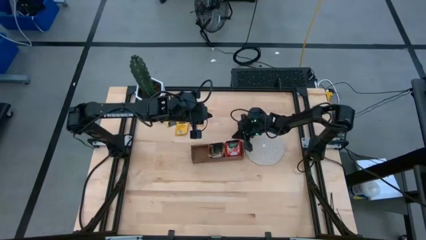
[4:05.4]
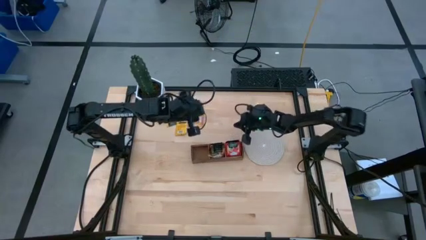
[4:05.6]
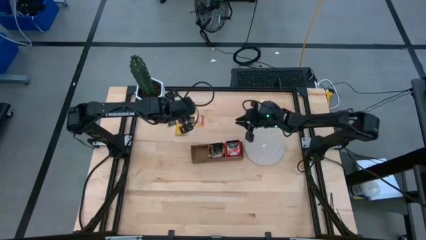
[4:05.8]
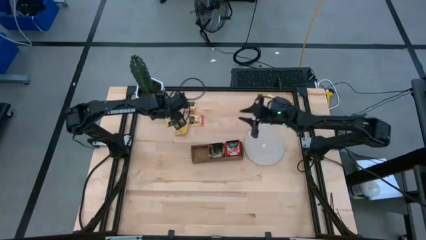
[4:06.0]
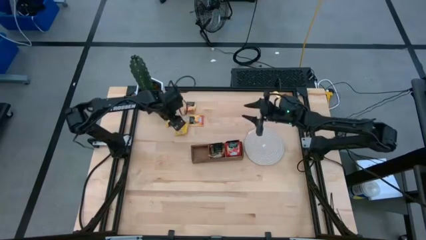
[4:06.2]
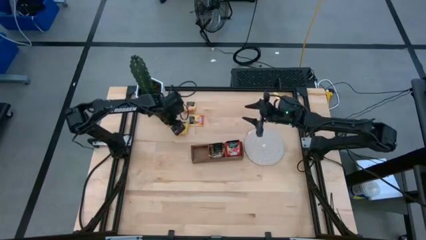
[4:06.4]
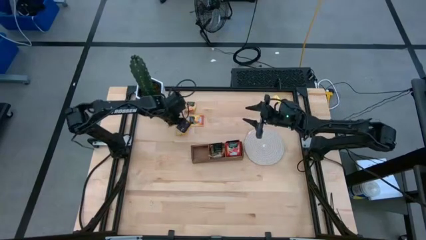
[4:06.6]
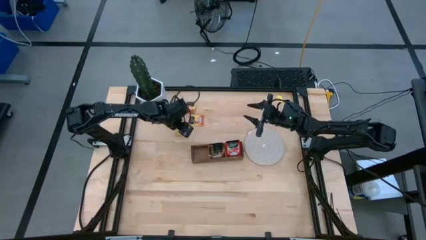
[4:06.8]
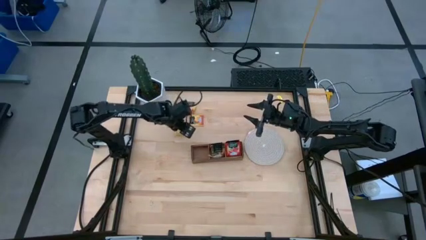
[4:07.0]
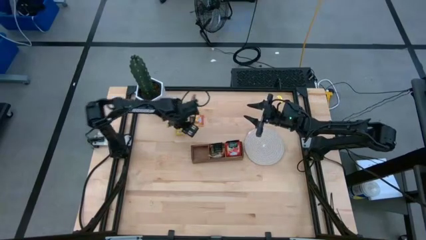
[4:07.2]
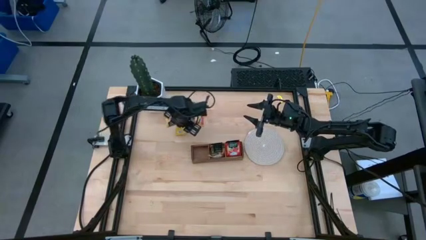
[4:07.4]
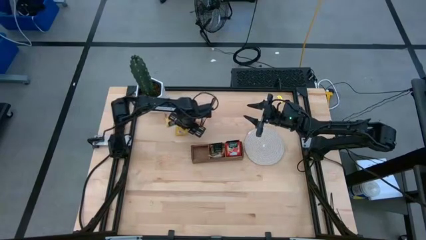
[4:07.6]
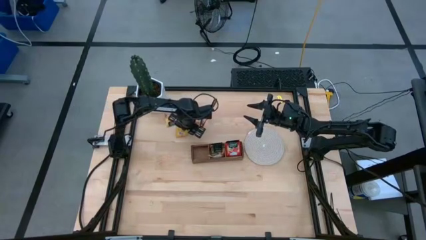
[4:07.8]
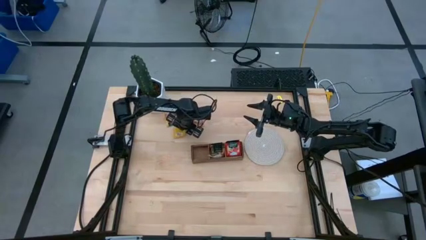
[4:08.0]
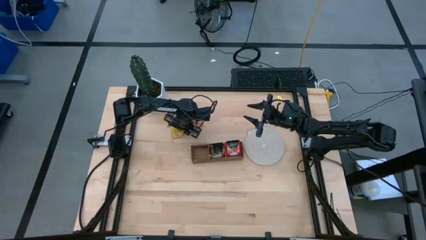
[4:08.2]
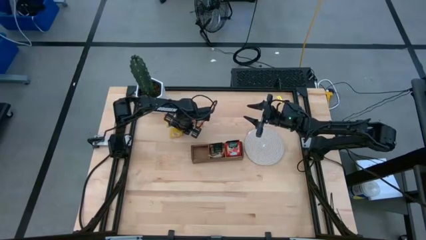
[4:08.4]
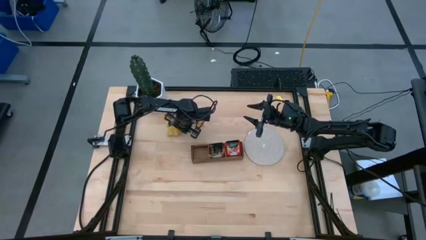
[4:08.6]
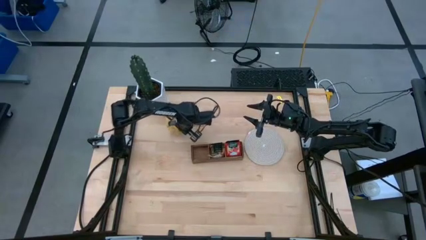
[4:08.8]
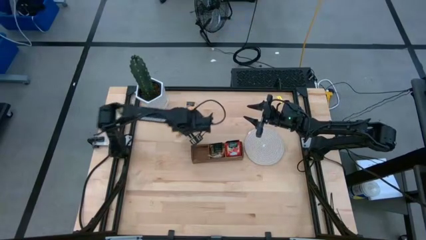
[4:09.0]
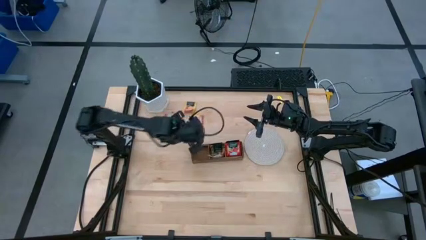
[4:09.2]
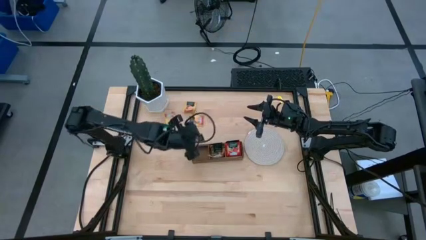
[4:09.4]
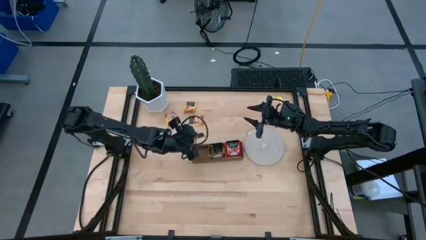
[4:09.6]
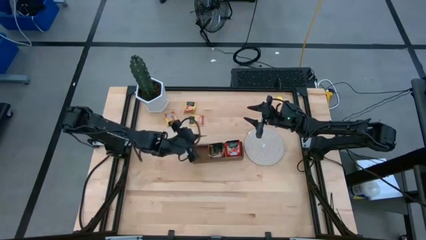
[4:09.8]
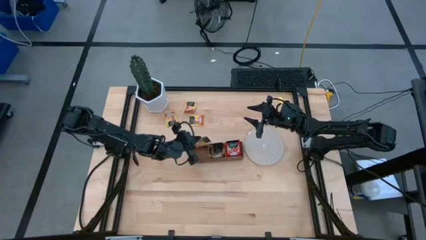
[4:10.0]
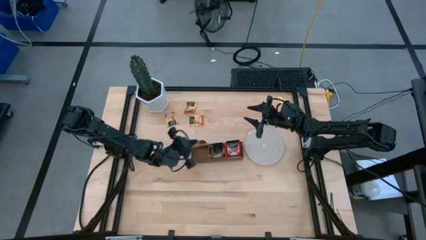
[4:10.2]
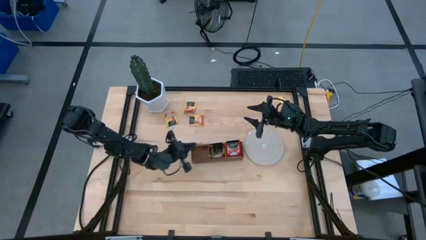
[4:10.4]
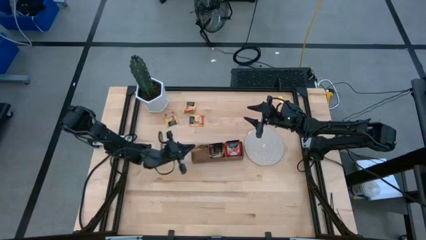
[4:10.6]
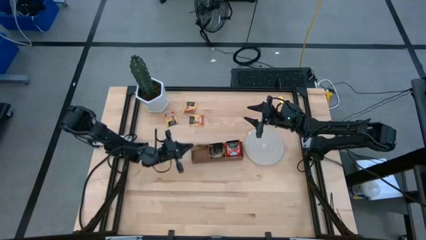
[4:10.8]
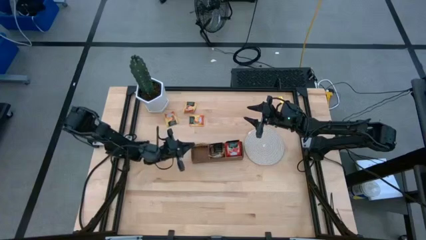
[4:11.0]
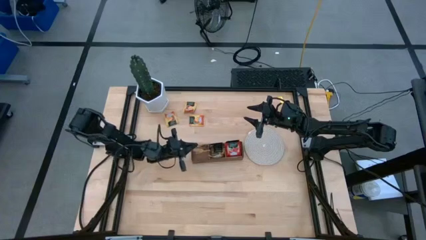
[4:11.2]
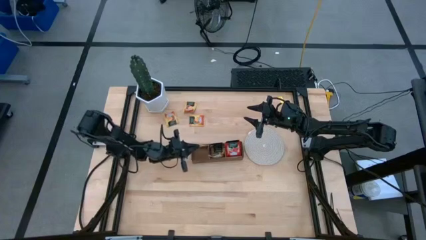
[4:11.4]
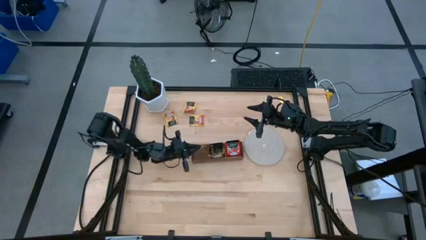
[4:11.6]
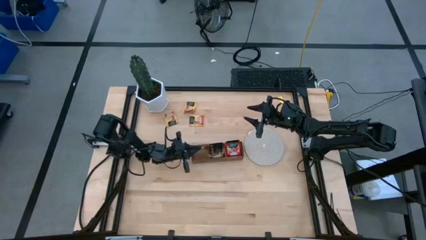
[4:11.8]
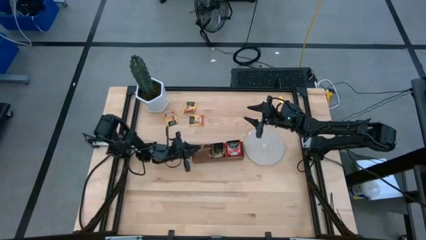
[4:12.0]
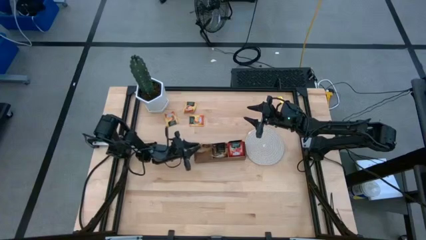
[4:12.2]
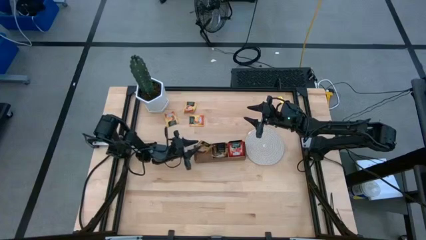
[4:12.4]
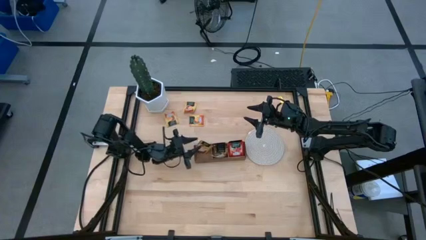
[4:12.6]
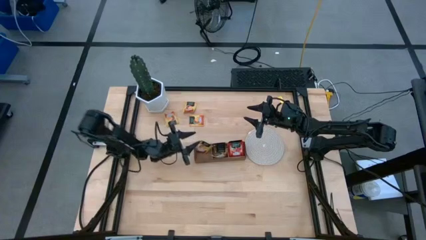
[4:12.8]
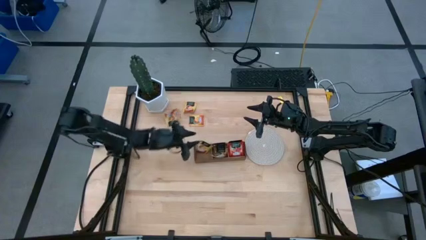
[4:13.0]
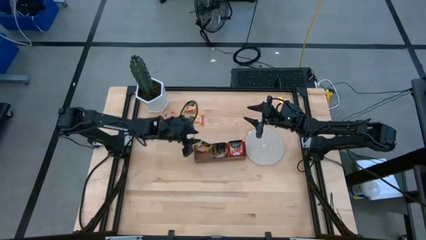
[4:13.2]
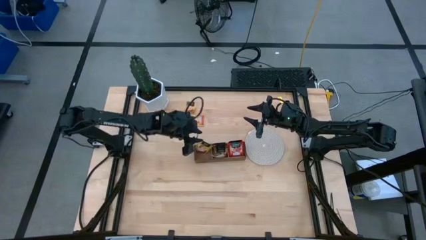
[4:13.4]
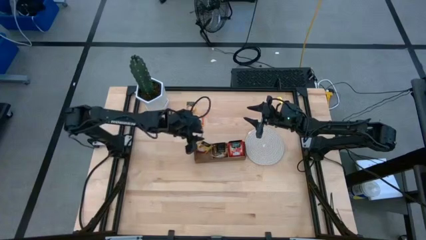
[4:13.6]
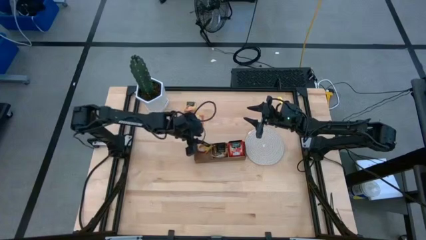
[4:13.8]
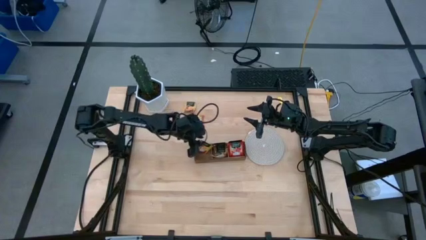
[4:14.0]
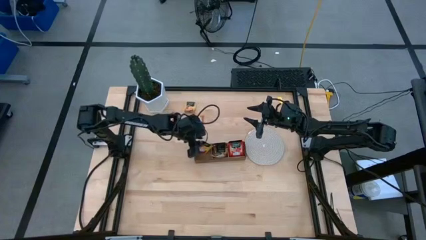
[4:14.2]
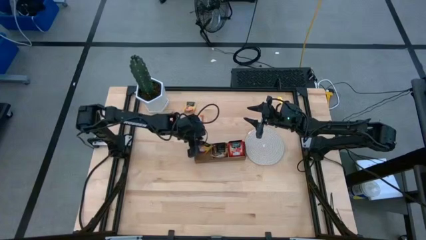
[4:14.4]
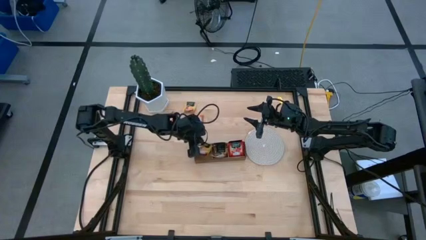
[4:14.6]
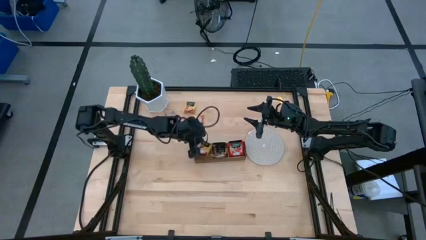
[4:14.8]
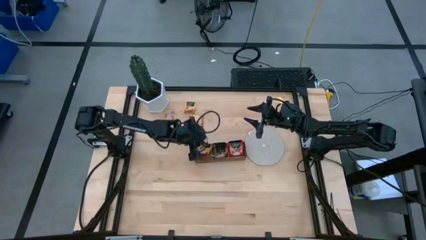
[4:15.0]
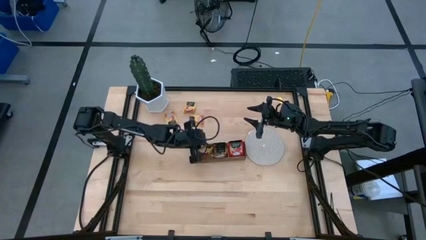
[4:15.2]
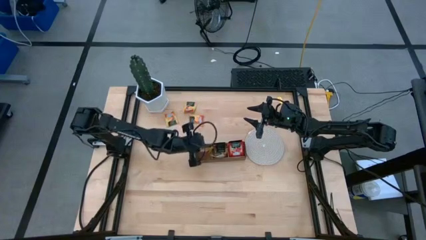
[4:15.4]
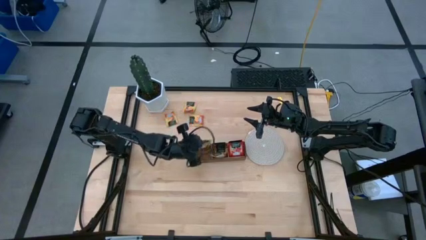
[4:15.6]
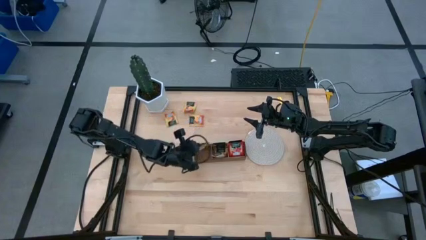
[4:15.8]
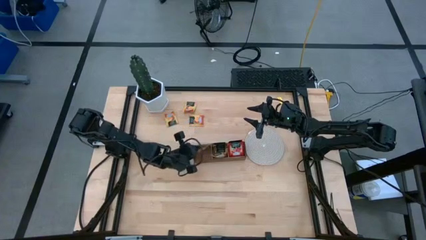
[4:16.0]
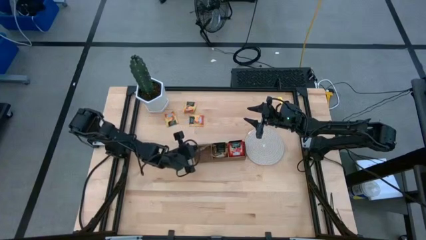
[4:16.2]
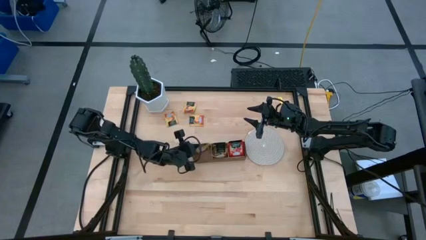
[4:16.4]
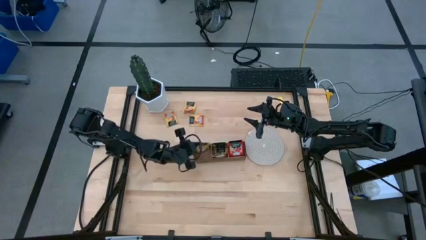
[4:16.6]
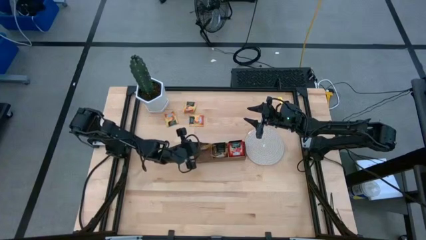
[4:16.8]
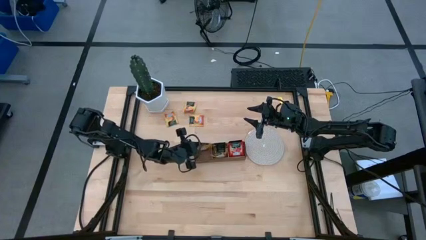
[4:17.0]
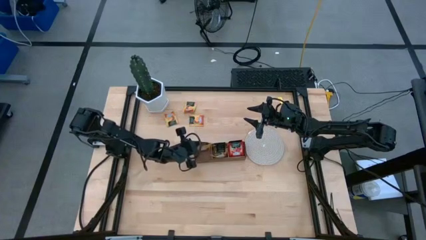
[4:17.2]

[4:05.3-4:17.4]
Task: Pick & Place Tea
Put the yellow tea bag into the left section of the wooden organizer

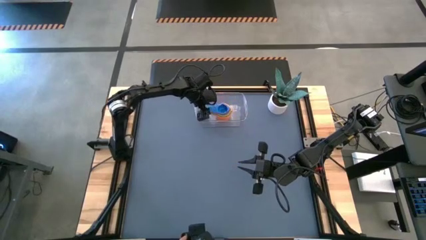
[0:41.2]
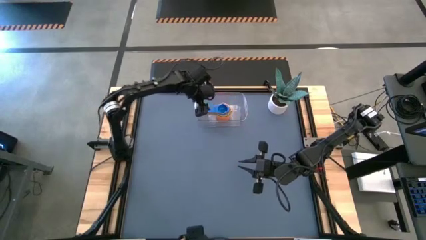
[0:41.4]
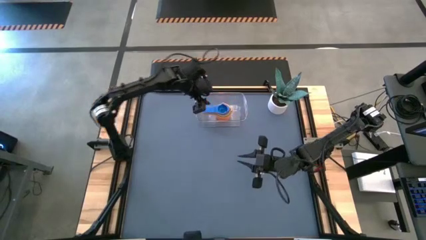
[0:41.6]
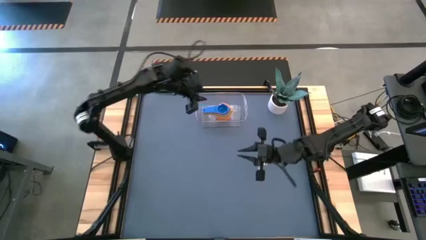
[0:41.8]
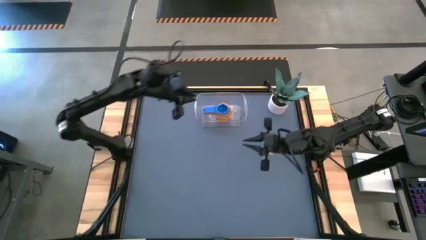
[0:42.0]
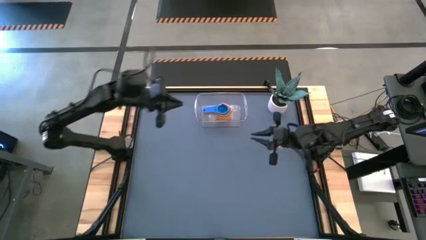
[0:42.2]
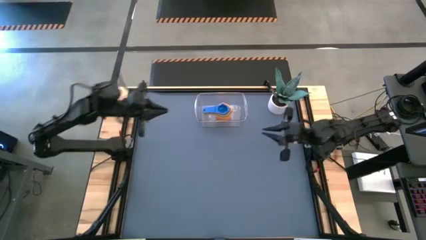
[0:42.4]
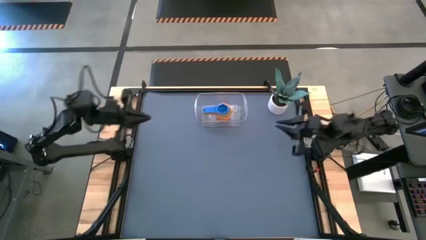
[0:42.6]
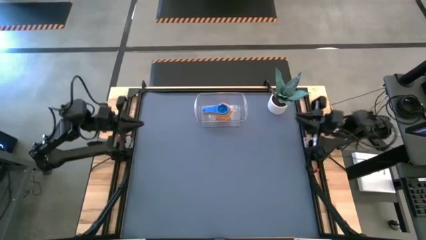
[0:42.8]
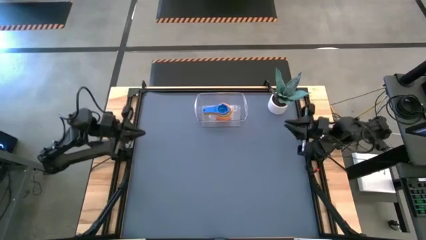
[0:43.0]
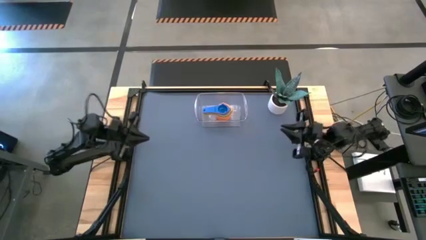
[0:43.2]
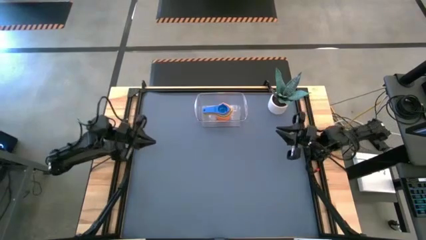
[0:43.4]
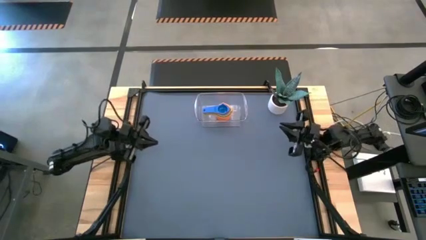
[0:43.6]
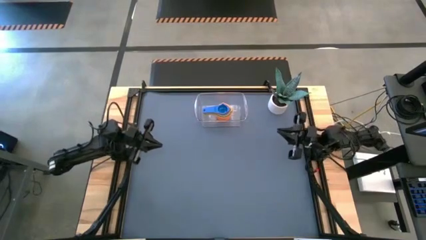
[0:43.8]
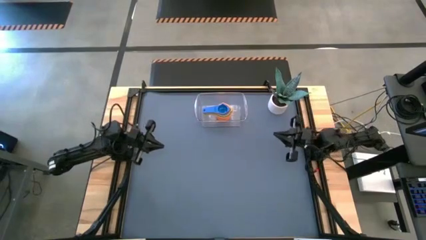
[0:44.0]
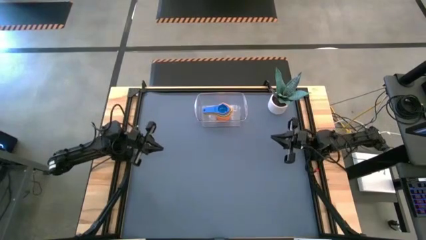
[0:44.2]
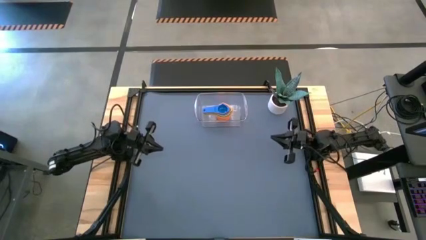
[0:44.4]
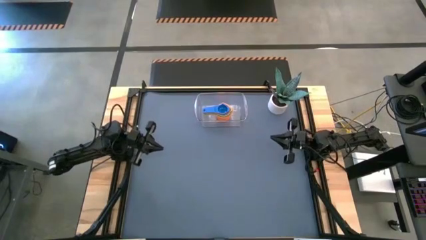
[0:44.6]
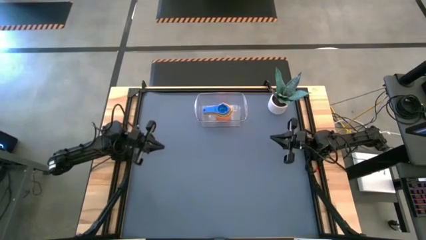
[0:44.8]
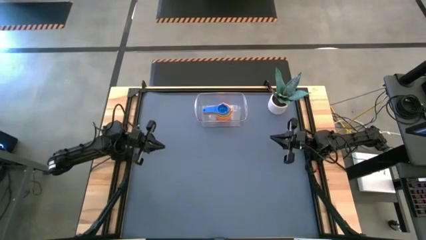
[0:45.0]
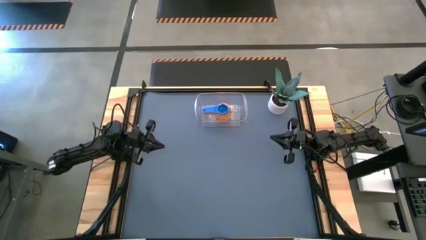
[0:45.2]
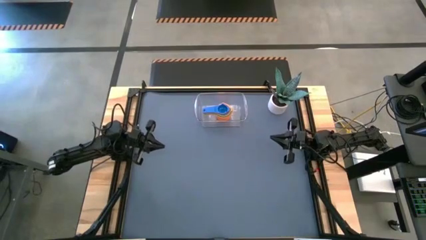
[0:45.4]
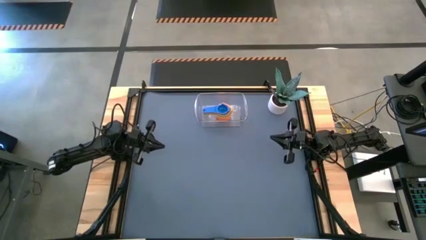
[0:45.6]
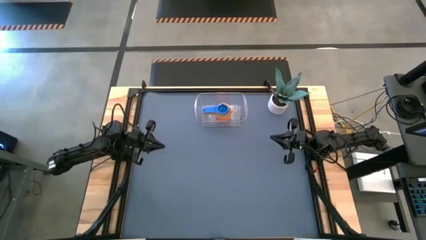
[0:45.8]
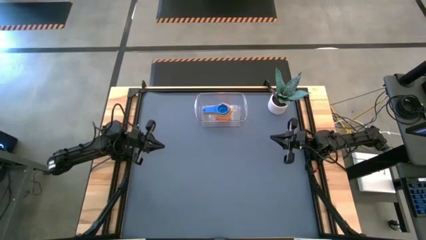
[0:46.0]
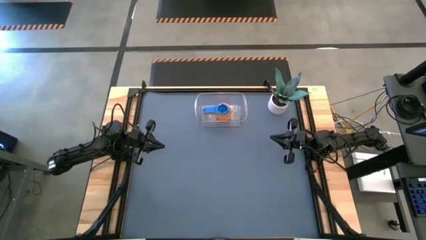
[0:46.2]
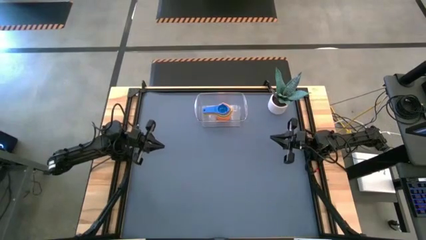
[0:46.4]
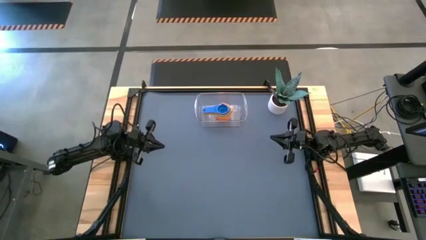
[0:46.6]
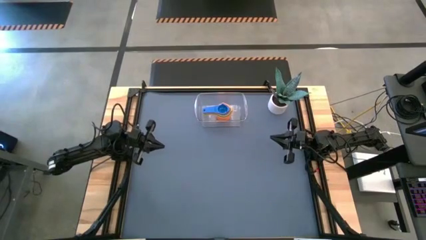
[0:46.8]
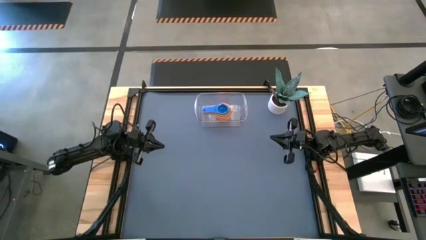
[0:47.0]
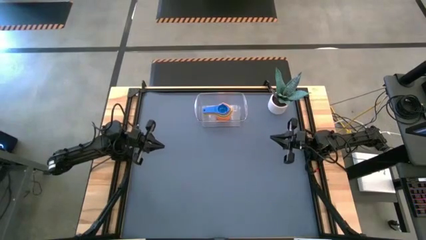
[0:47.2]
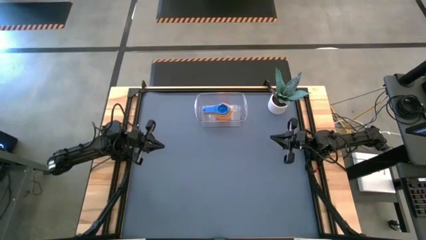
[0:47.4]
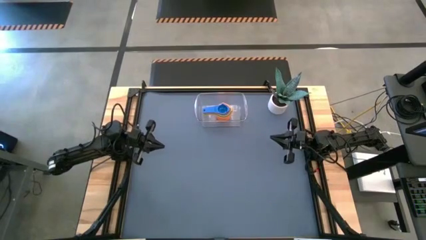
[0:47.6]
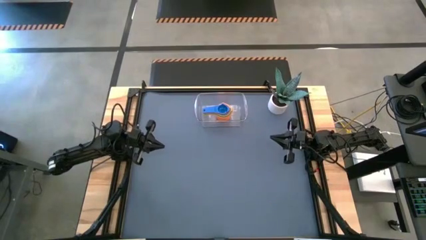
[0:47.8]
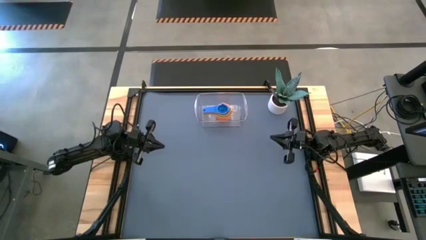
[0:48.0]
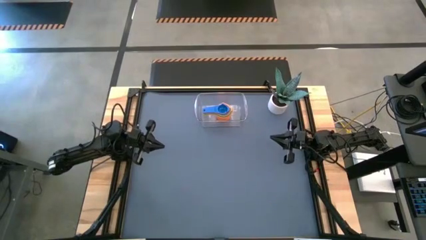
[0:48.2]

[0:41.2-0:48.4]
Task: Nest measuring cups in basket
Return to Home Position
